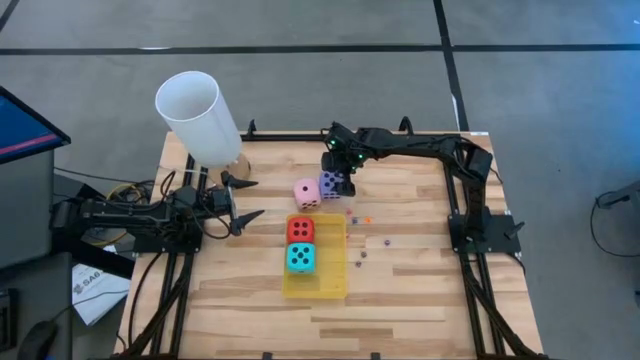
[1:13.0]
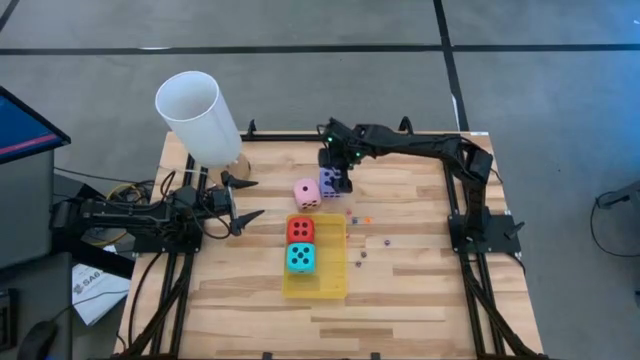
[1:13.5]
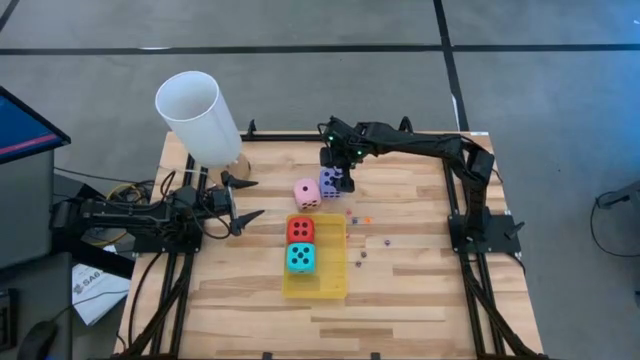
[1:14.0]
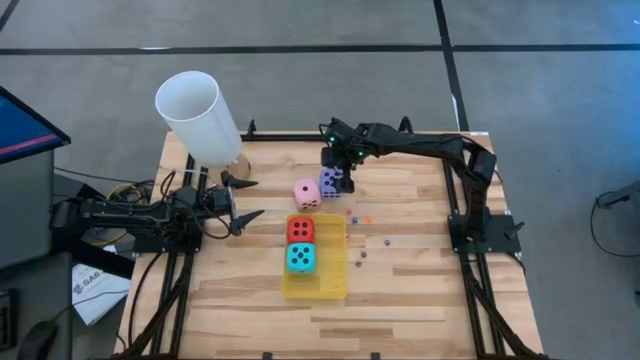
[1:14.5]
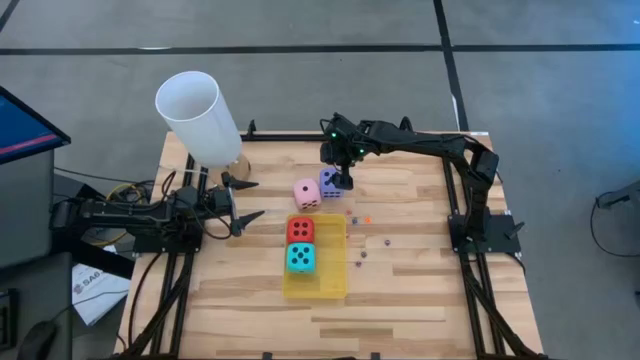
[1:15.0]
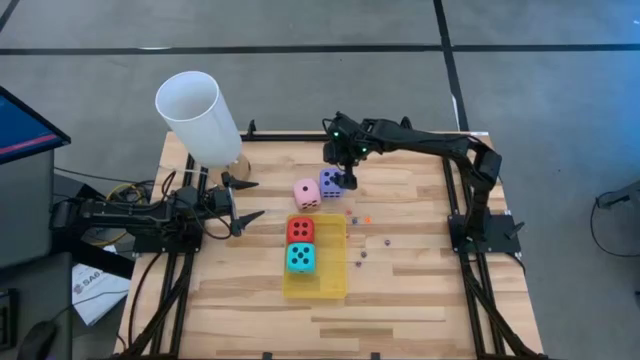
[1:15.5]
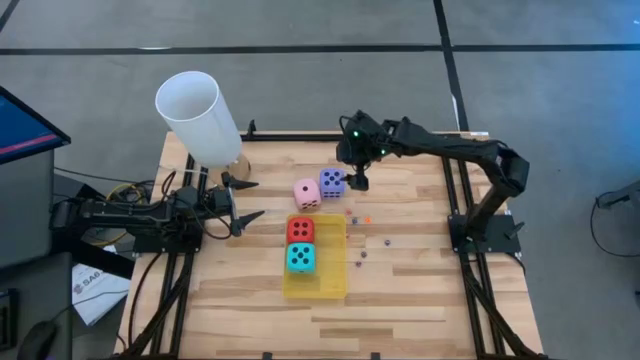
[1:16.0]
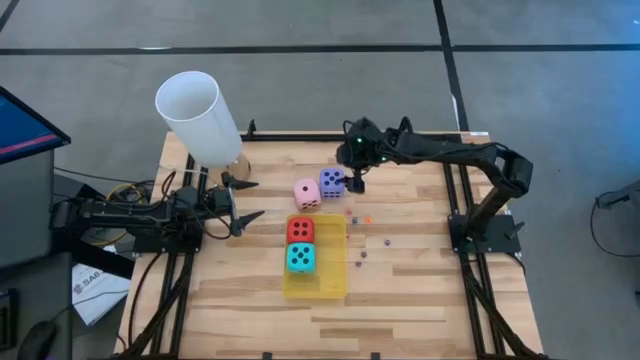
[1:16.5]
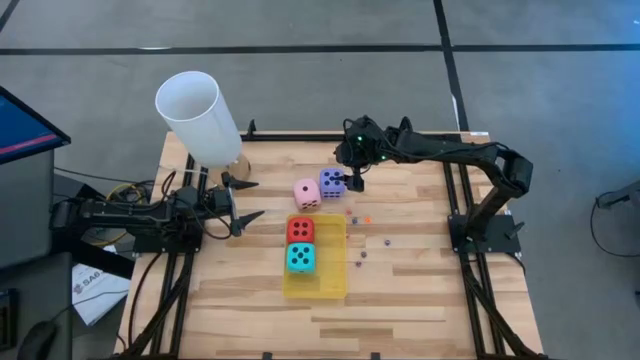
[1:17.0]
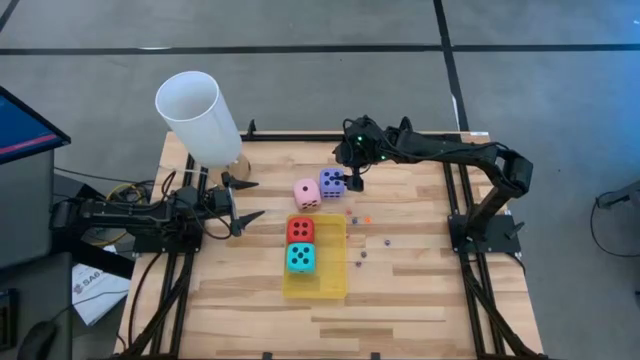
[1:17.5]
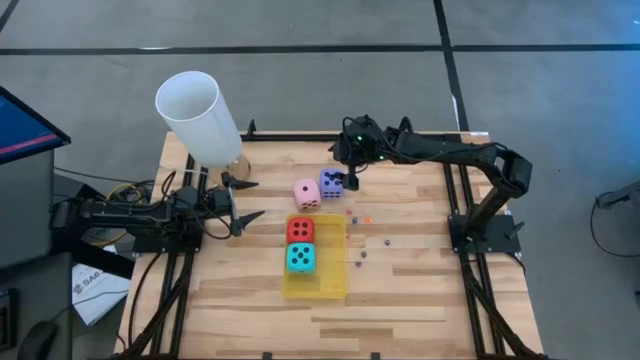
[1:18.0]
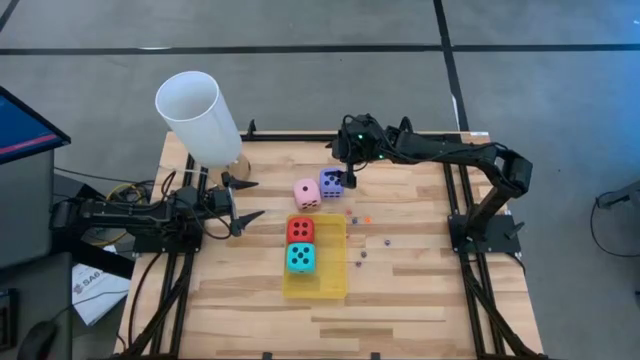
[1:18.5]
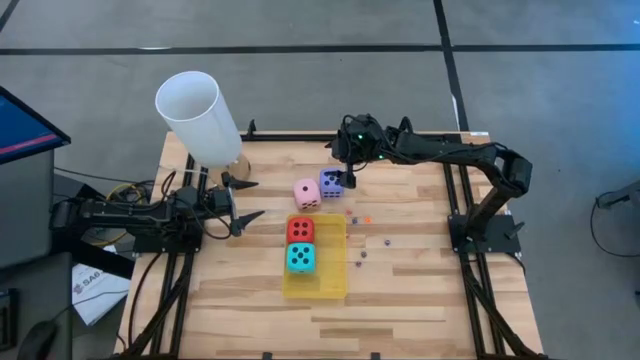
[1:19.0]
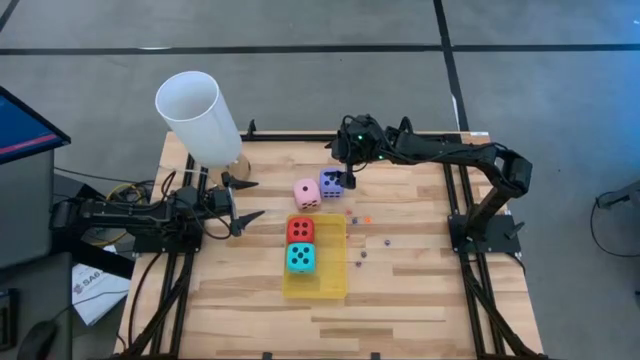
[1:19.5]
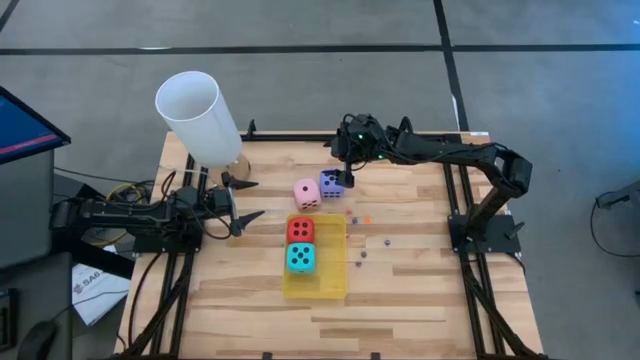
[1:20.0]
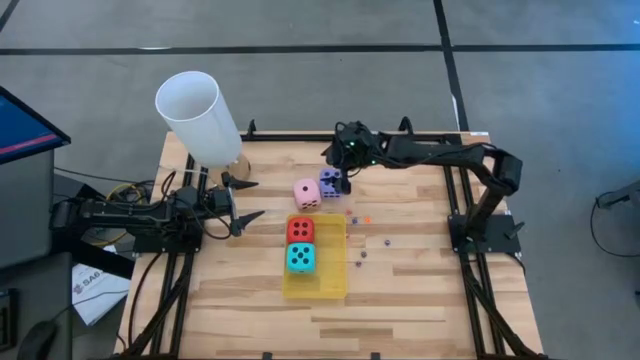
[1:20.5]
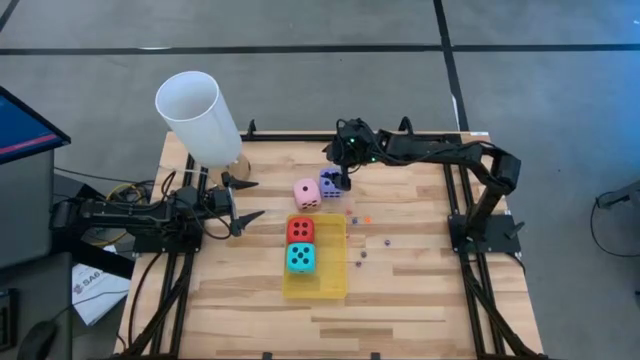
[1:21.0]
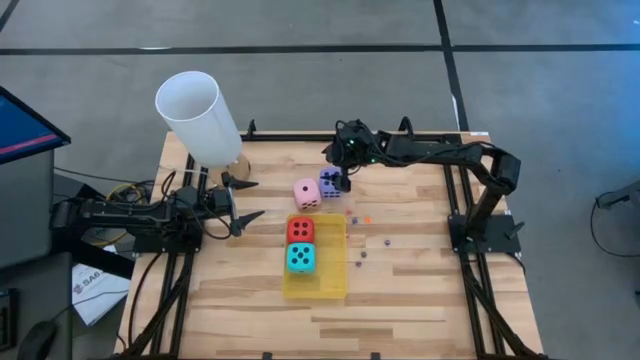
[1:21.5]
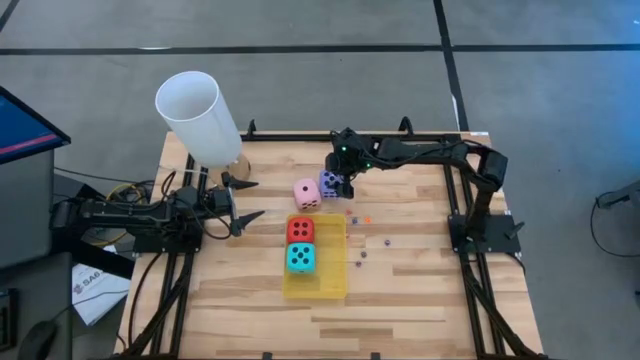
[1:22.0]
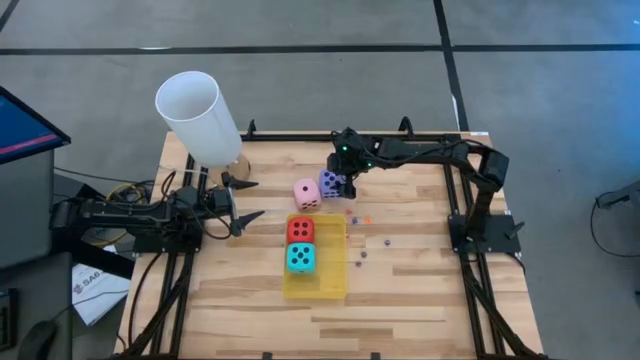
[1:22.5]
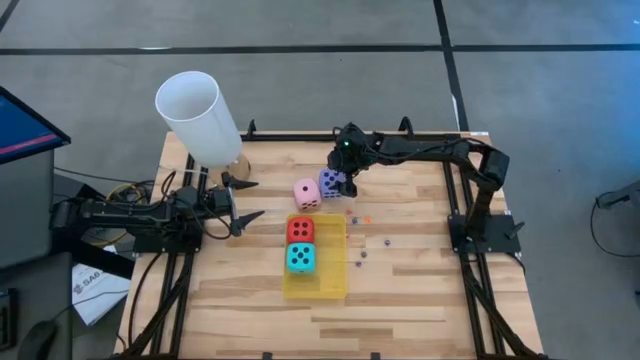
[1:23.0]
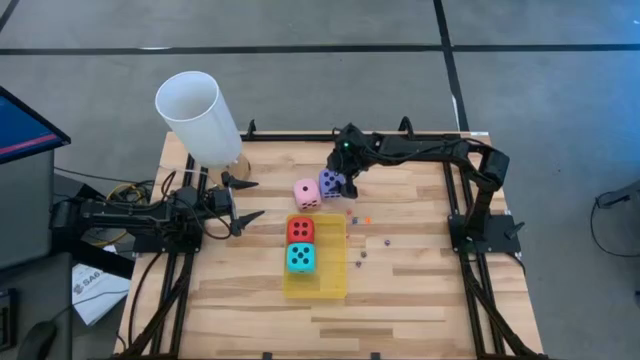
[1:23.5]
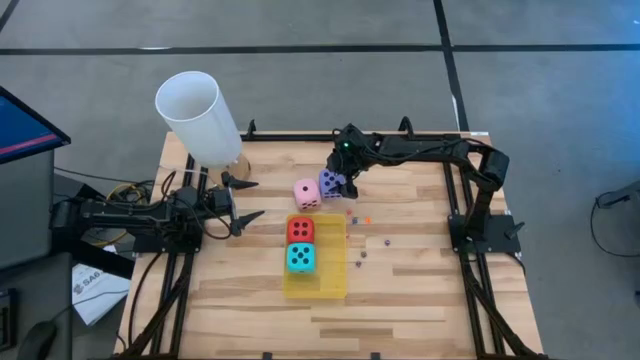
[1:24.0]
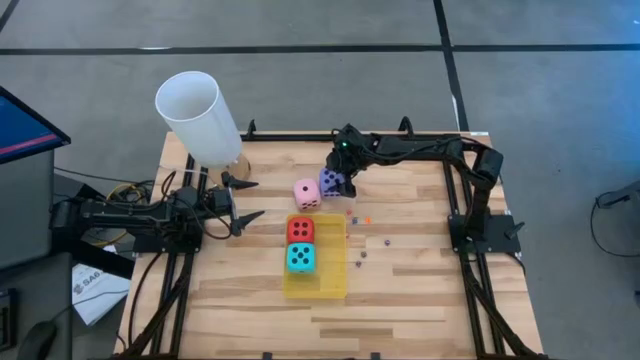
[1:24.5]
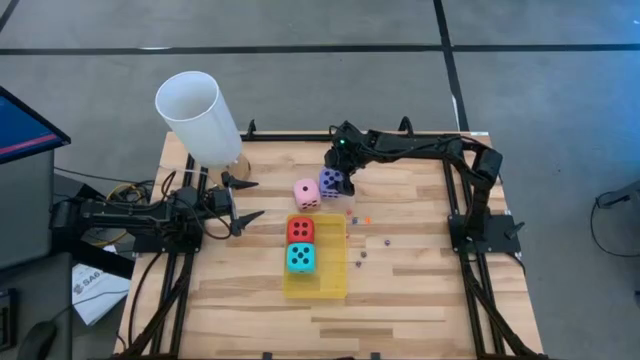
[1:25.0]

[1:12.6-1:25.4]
Task: Pick & Place Dice
Put the violet die into the yellow bin

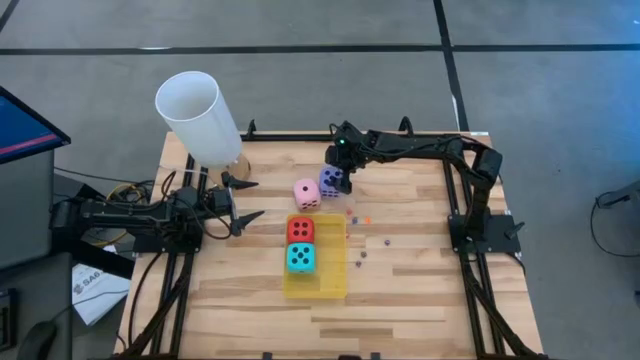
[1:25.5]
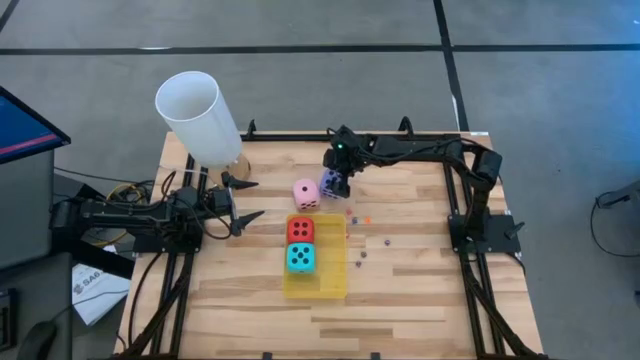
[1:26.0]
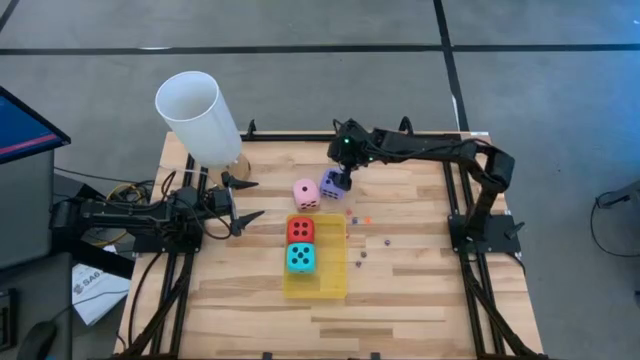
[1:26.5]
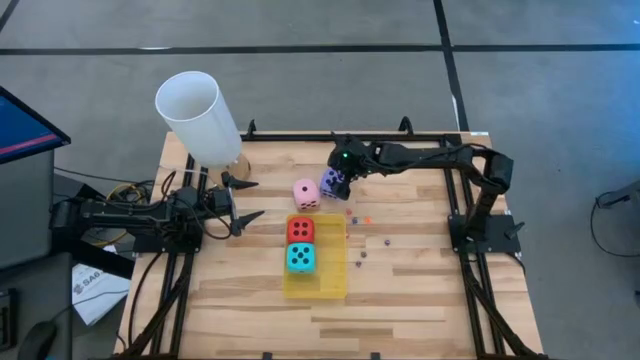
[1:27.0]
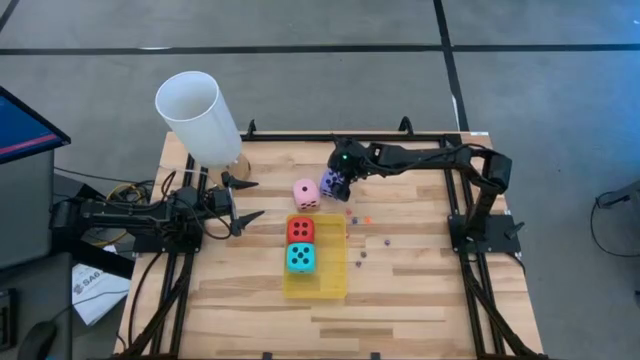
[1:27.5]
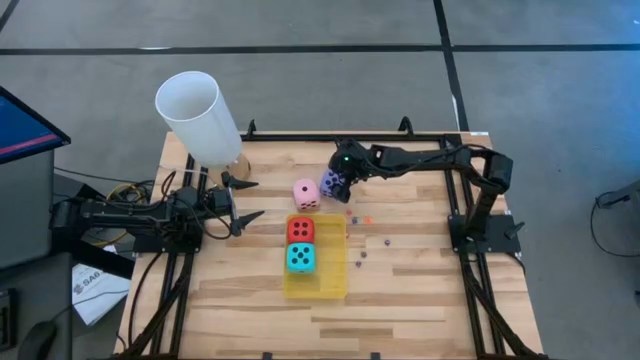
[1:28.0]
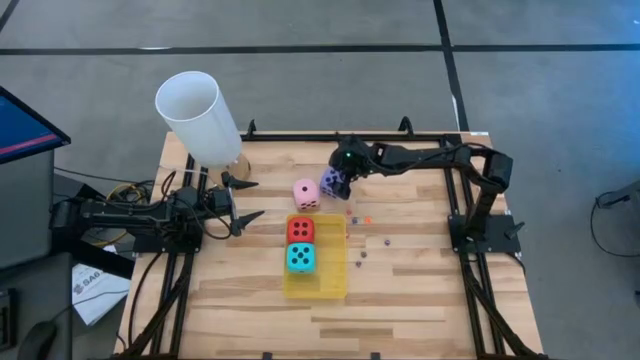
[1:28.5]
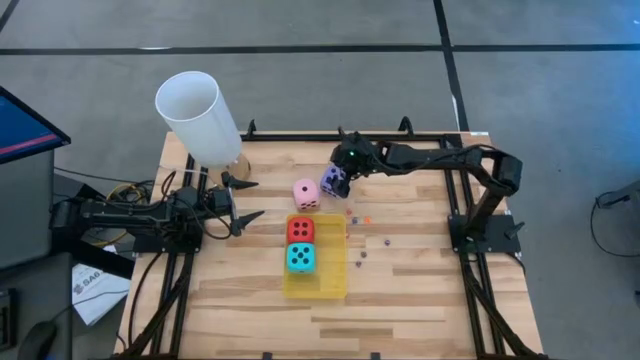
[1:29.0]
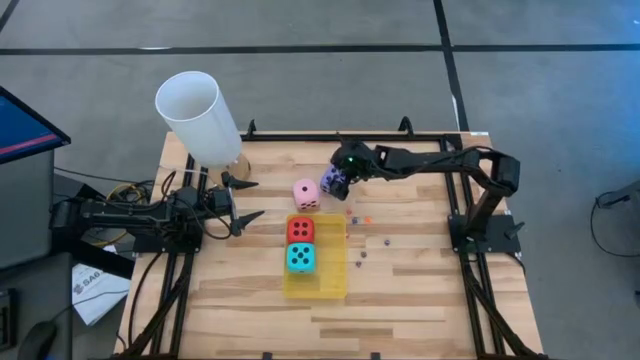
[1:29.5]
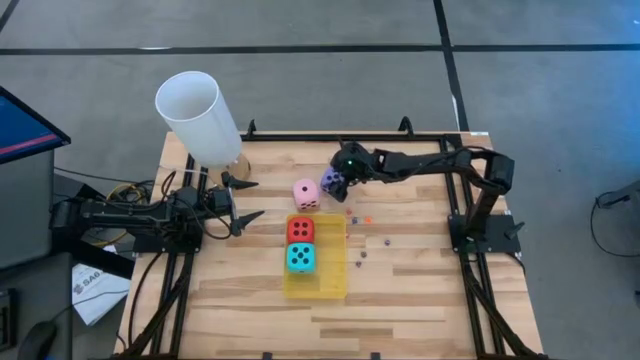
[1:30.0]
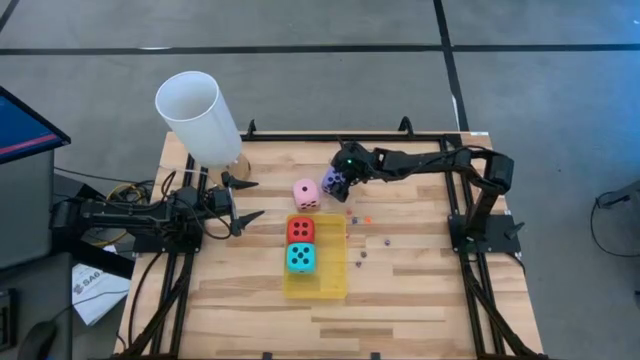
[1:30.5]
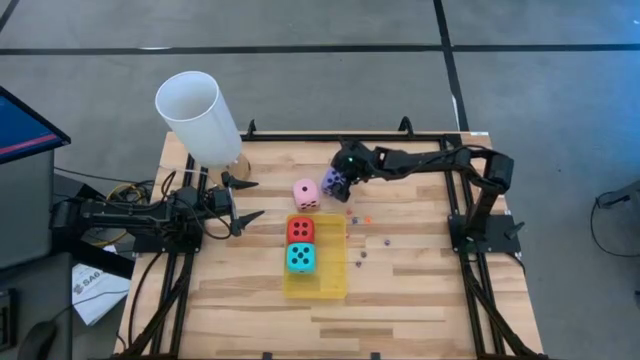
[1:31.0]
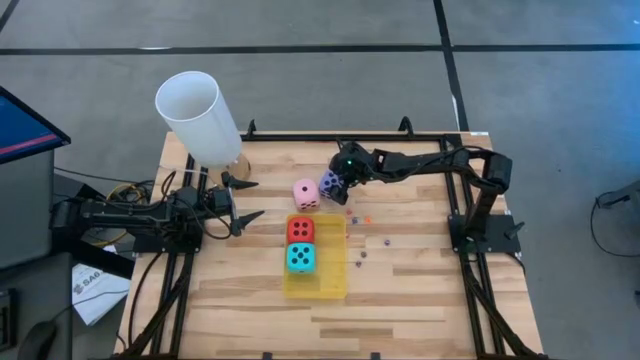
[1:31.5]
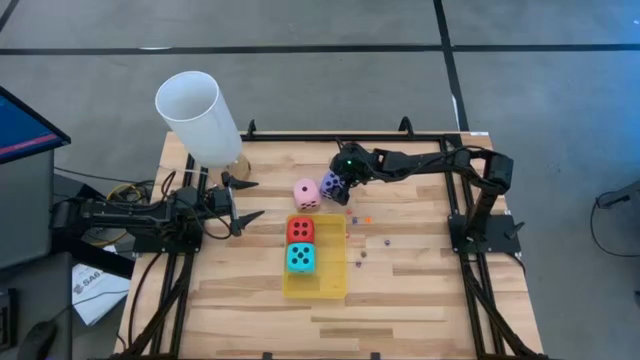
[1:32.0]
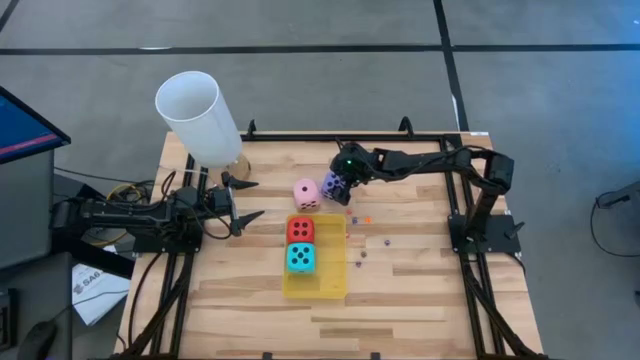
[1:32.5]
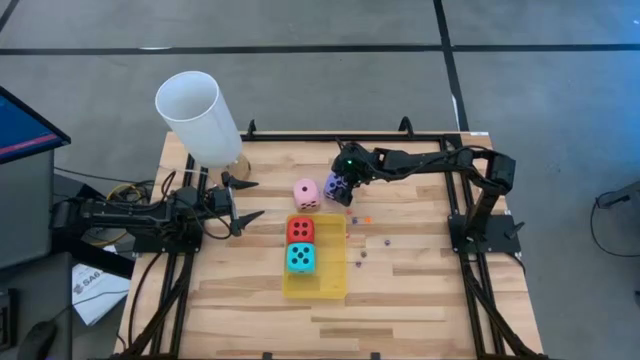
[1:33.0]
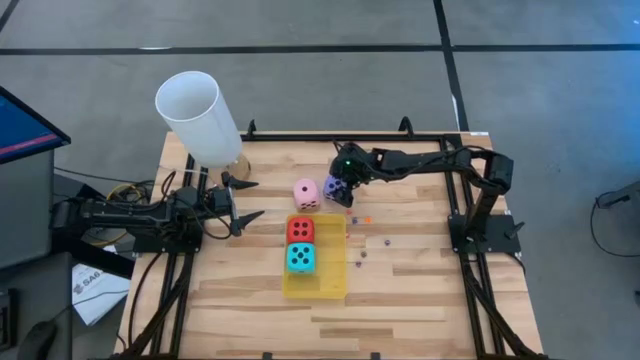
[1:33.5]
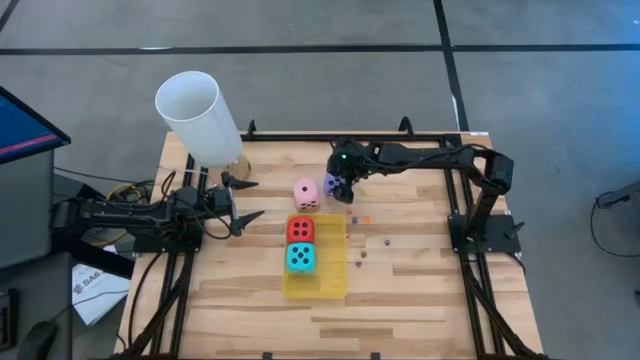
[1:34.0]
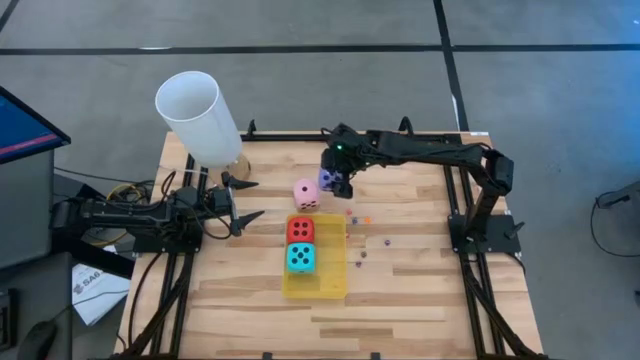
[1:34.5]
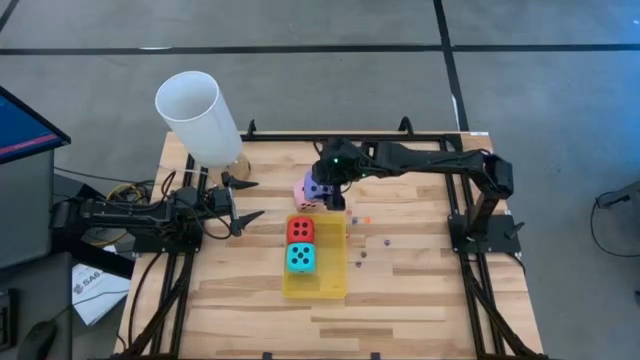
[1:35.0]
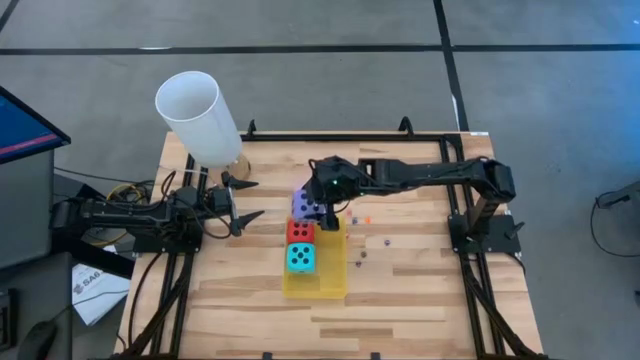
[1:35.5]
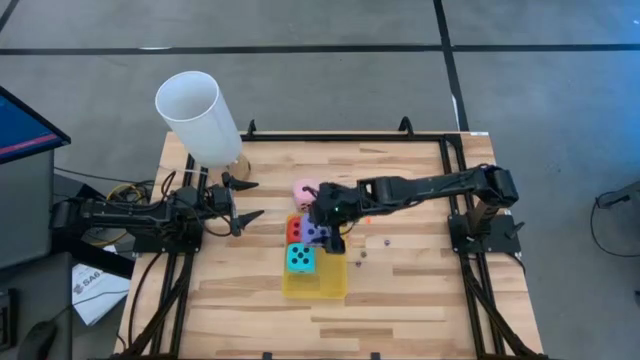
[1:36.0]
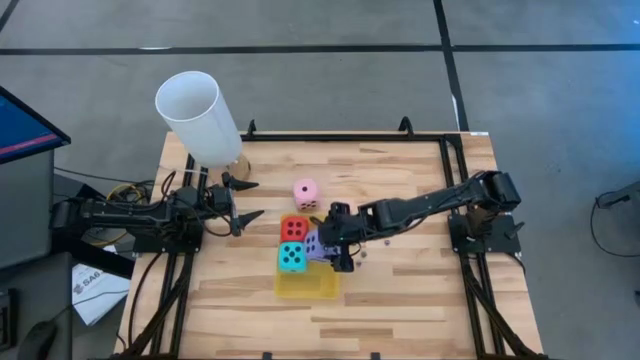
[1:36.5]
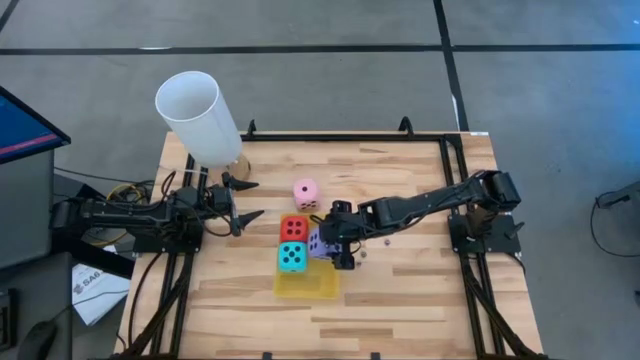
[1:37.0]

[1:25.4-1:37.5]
Put the violet die into the yellow bin
